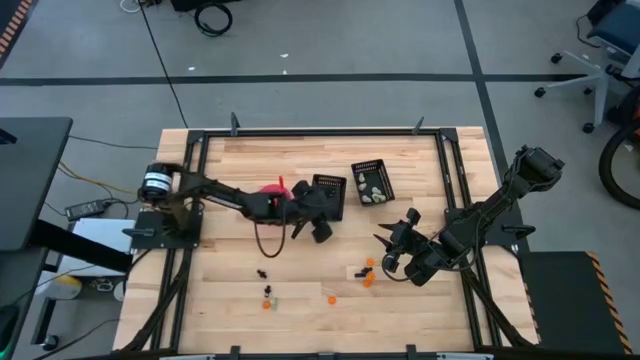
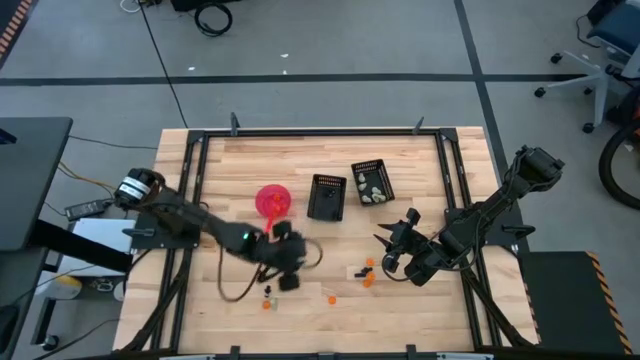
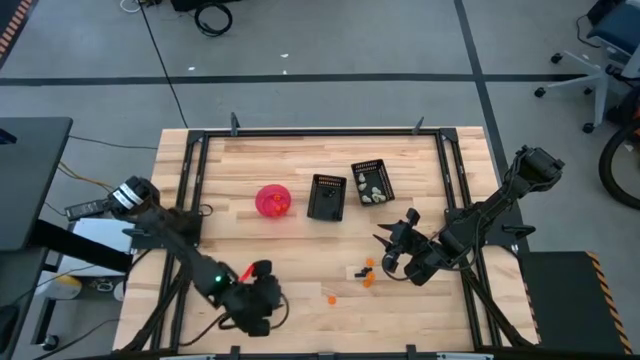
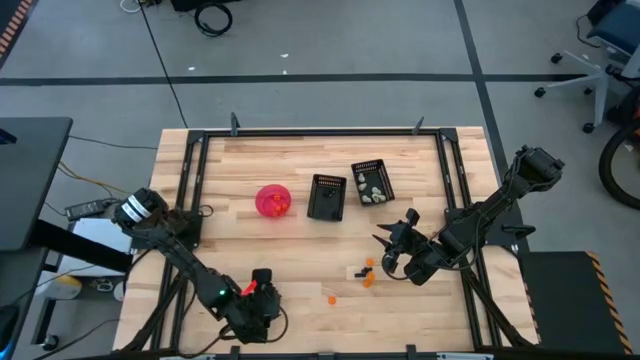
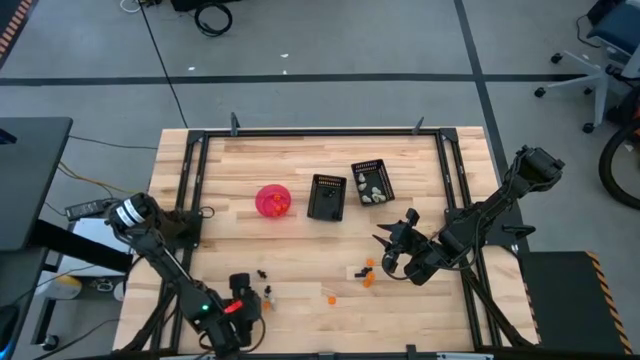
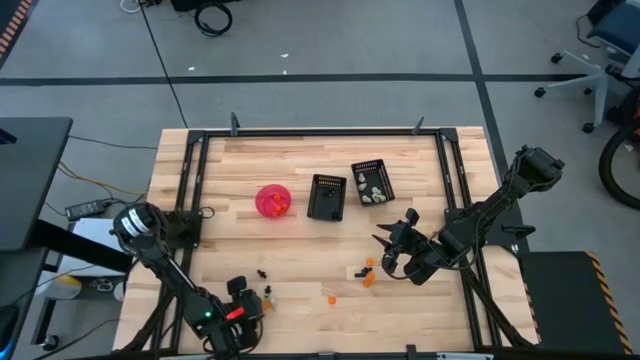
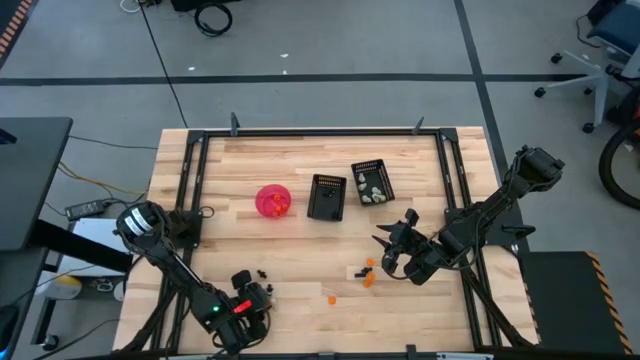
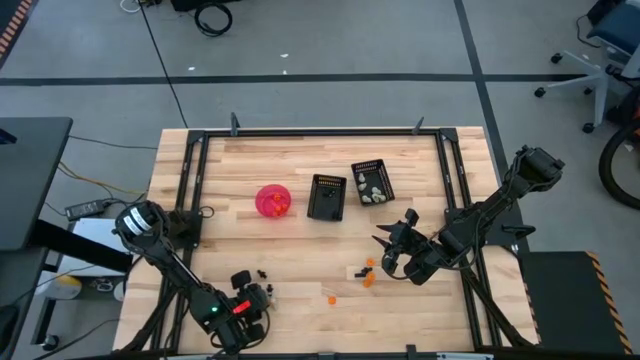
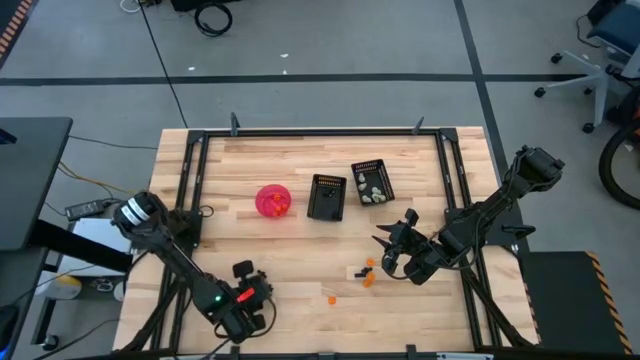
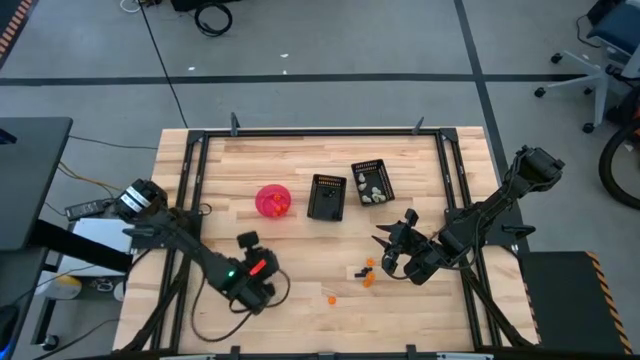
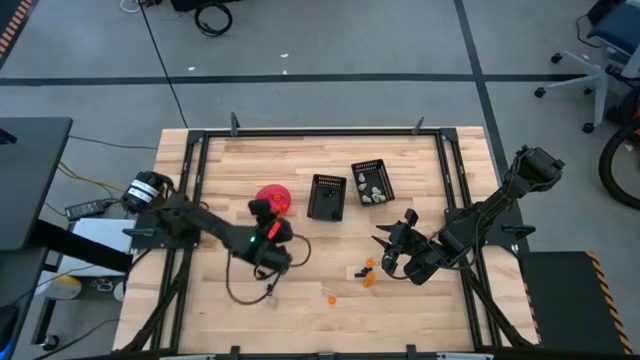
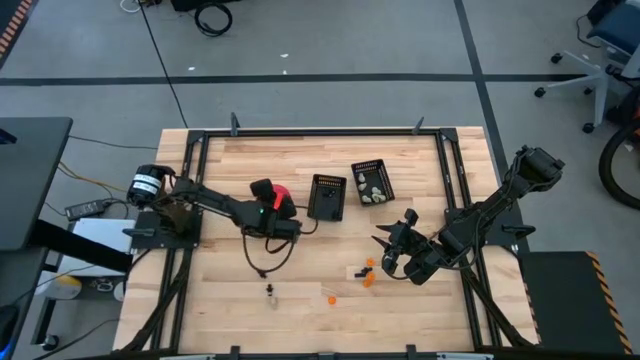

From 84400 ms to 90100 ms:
Task: Sort Halloween decoration
Put the orange pumpkin toy into the red bowl

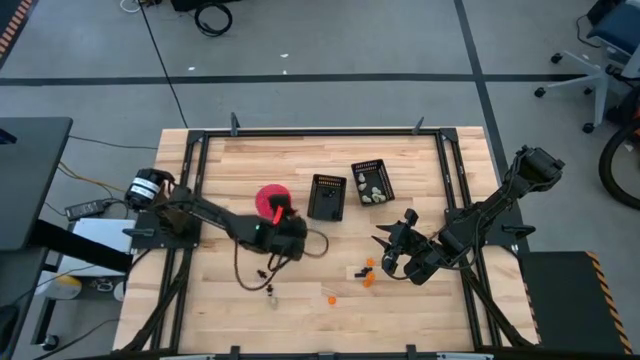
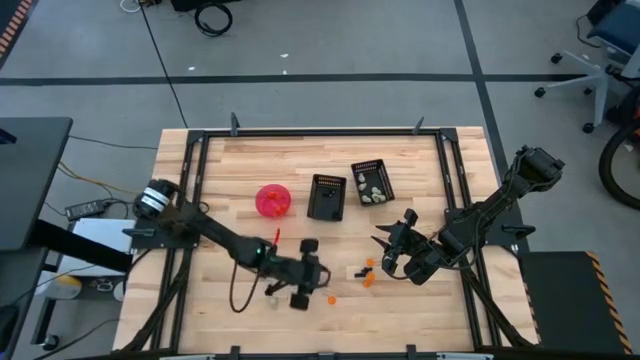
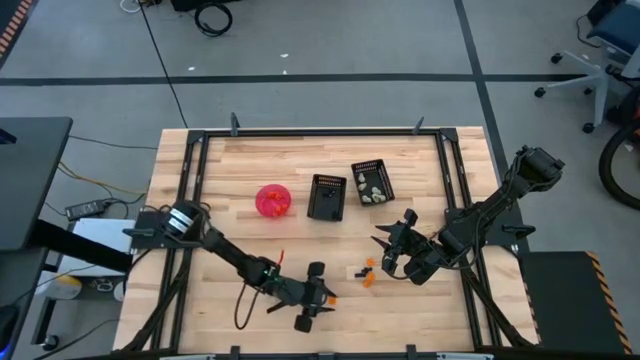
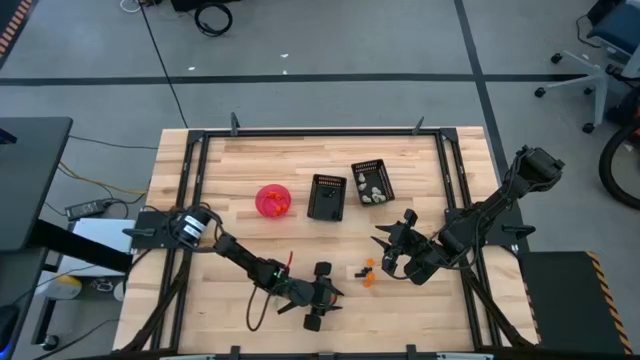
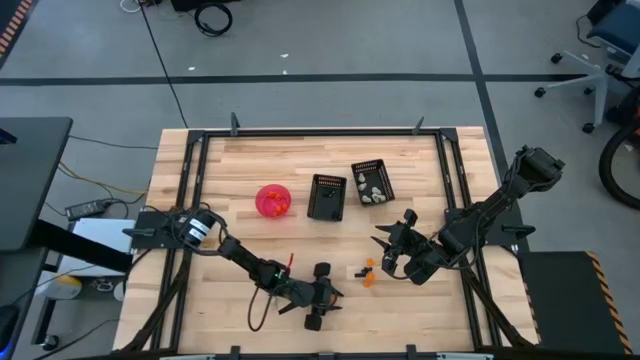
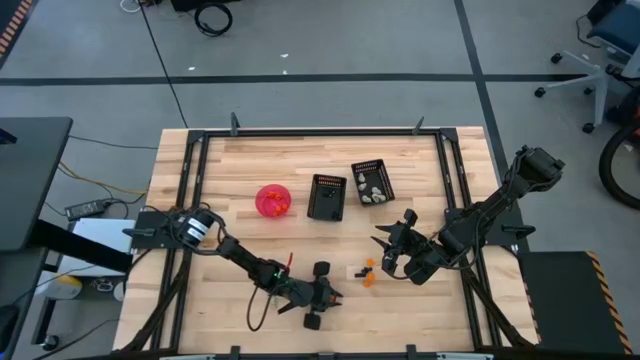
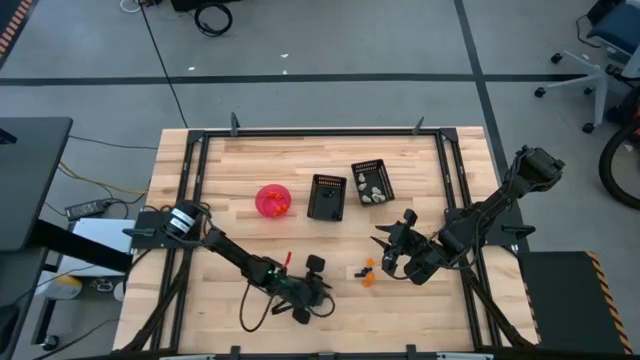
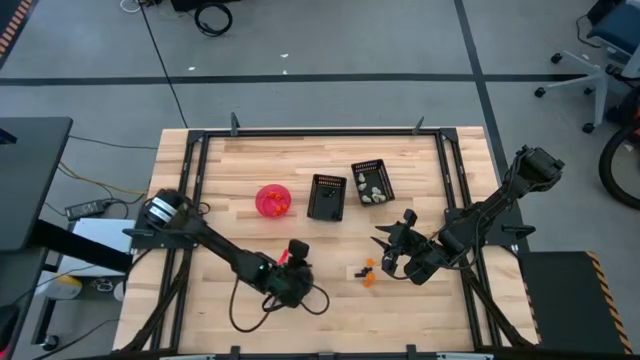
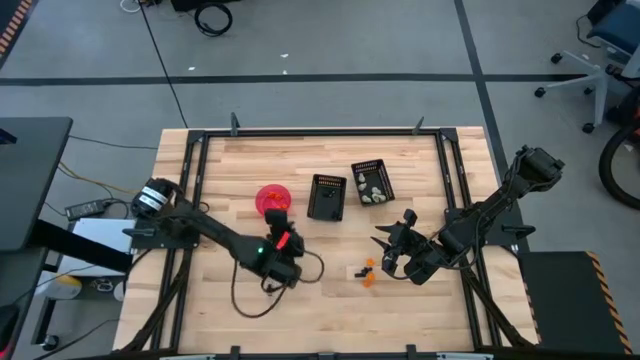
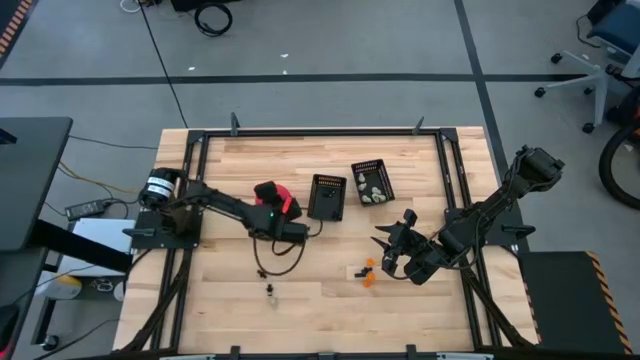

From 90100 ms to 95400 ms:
Put the orange pumpkin toy into the red bowl

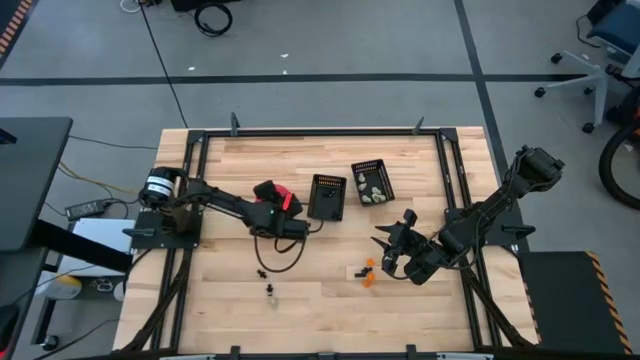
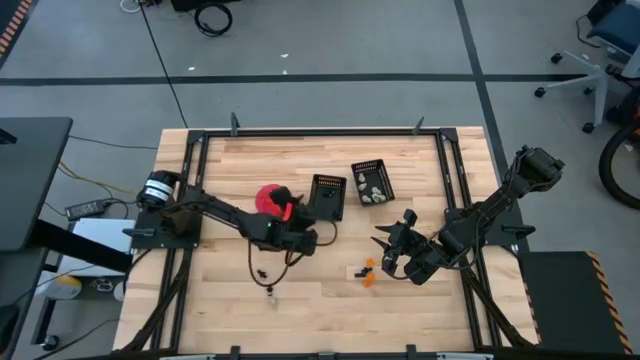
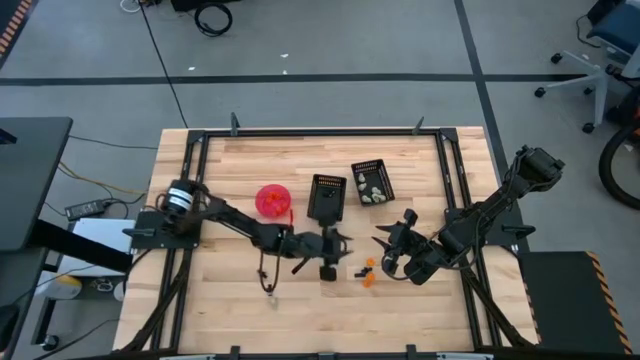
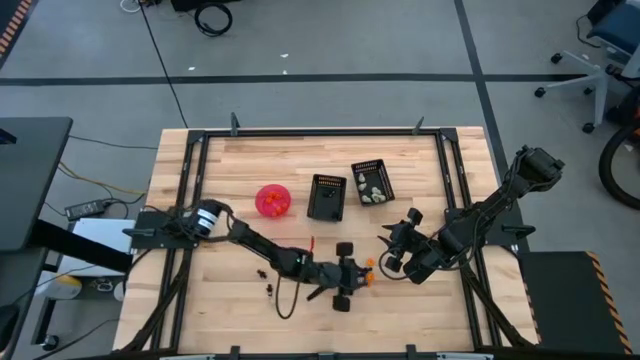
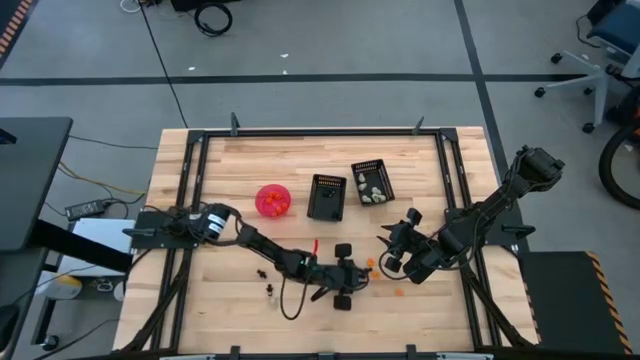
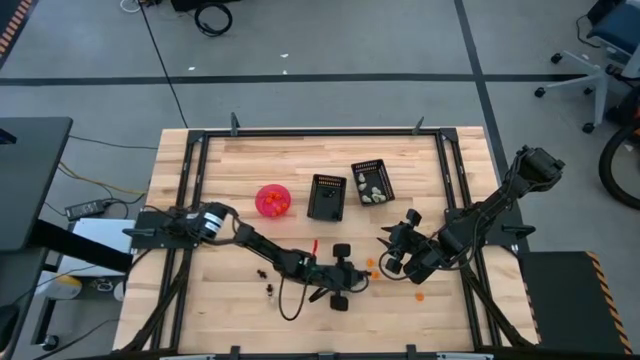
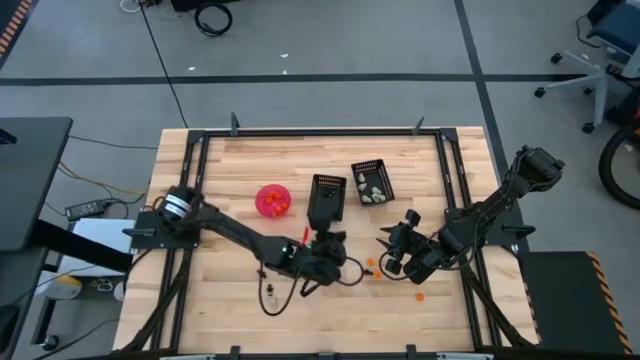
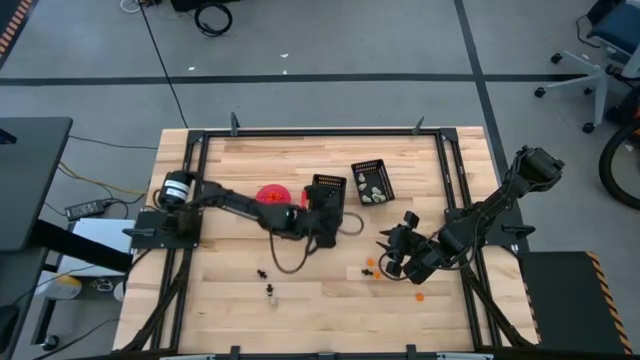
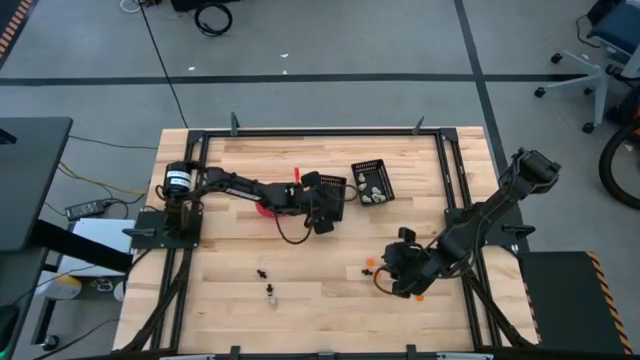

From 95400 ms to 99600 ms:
Put the black skeleton toy into the left black bin

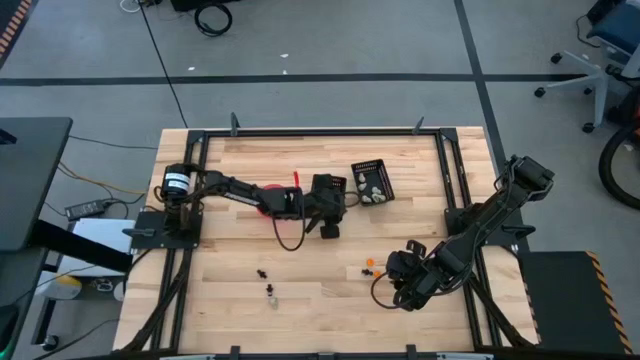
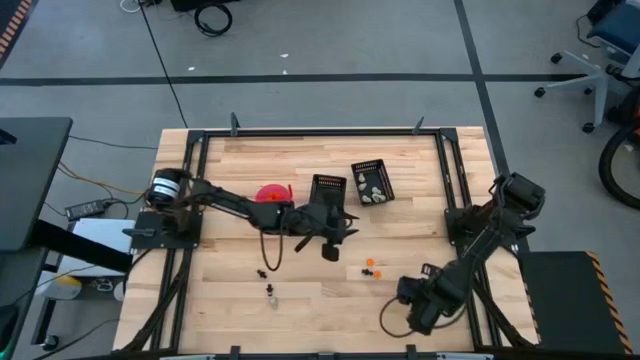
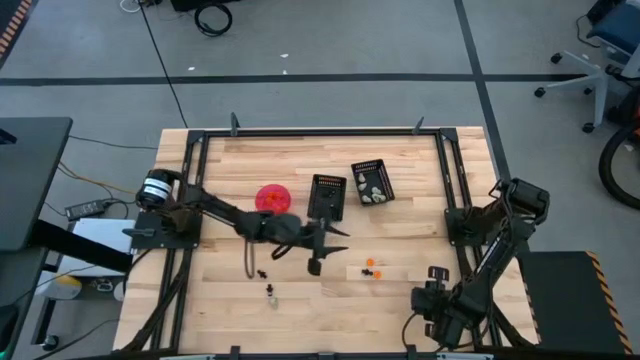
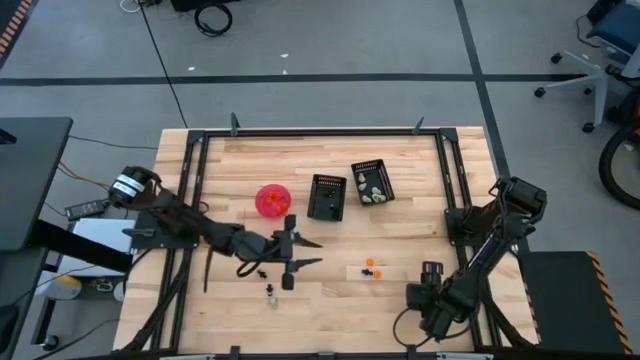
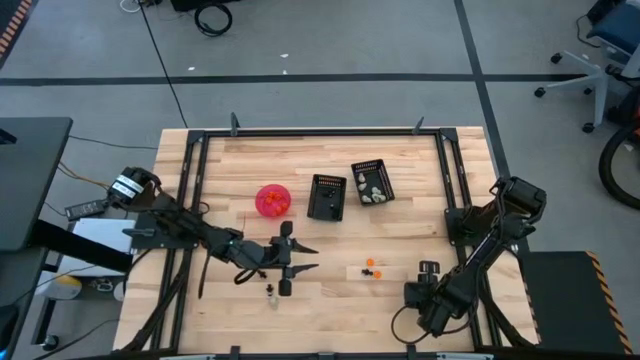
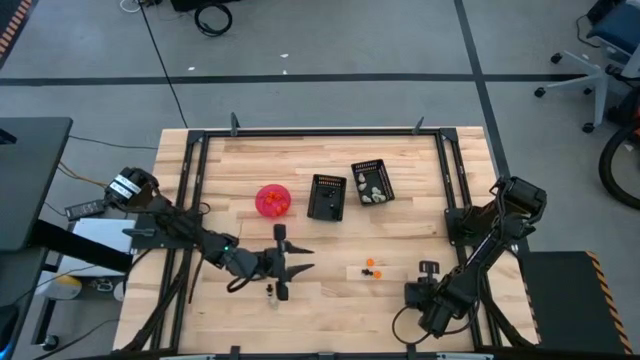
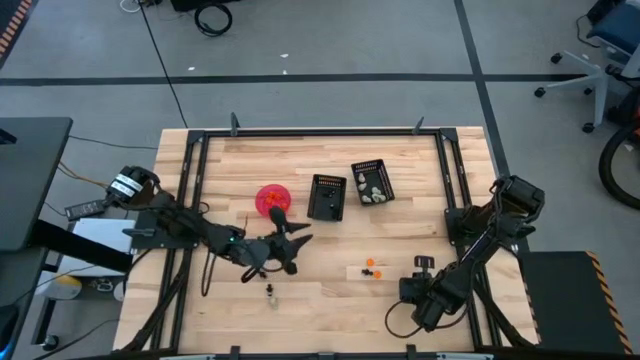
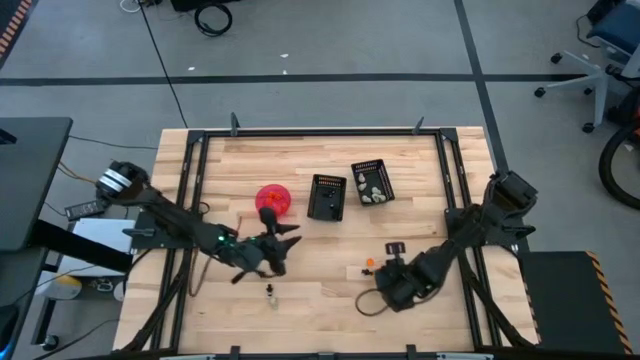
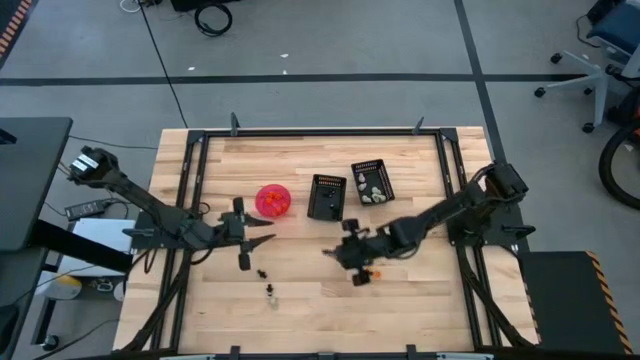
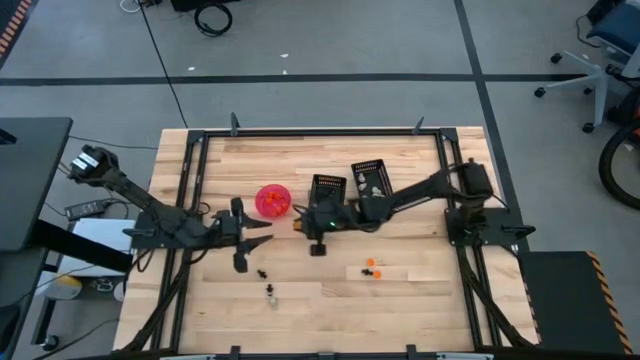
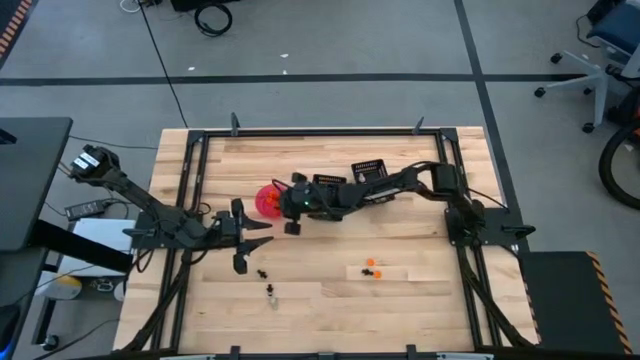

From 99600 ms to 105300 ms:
Put the orange pumpkin toy into the red bowl
